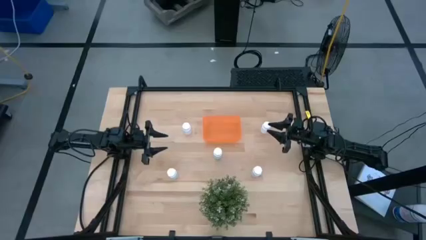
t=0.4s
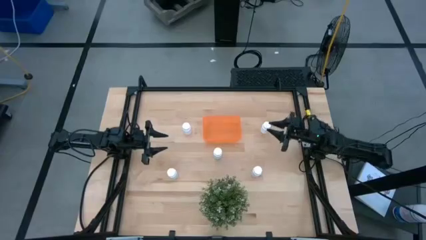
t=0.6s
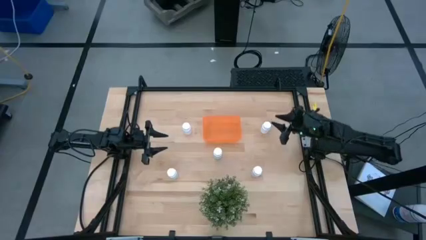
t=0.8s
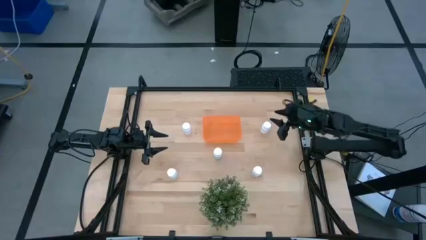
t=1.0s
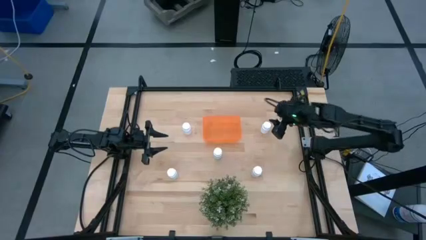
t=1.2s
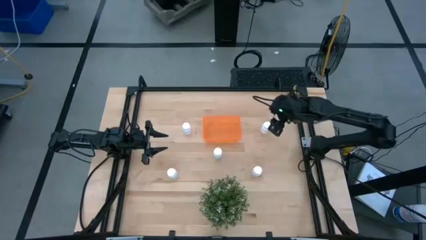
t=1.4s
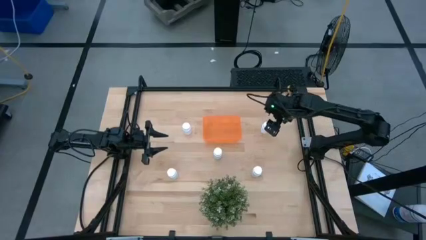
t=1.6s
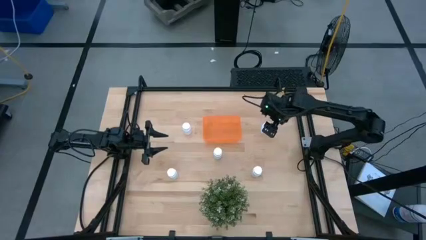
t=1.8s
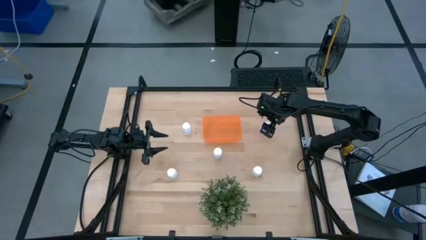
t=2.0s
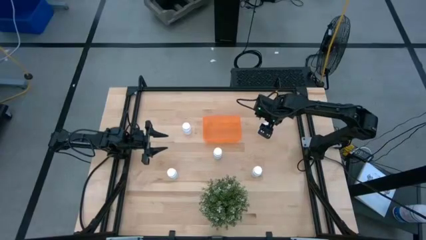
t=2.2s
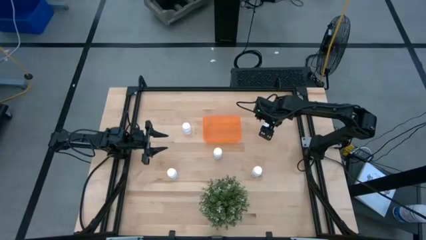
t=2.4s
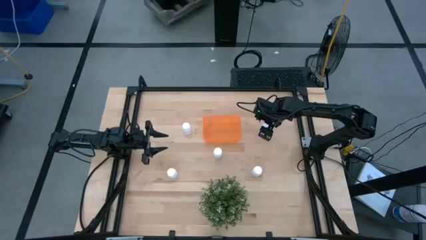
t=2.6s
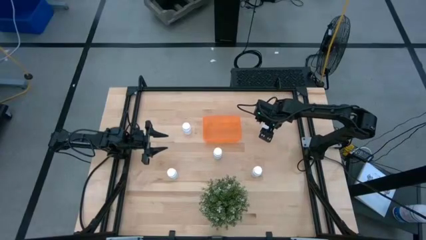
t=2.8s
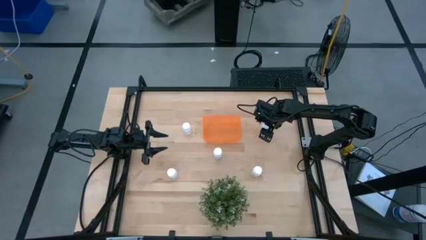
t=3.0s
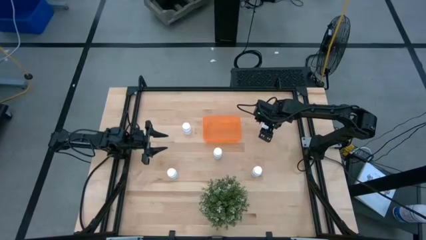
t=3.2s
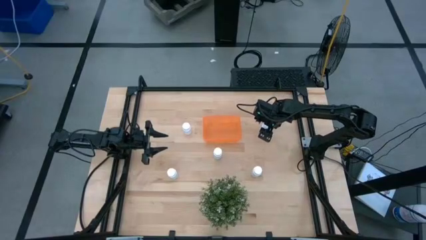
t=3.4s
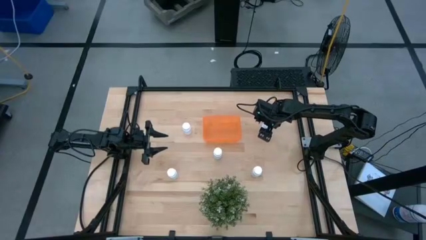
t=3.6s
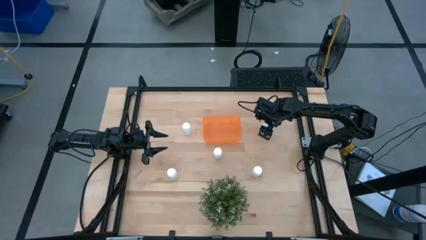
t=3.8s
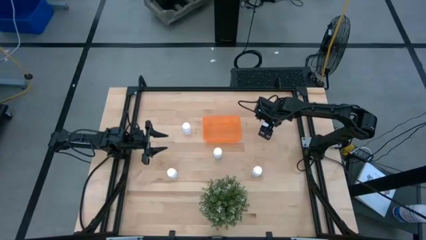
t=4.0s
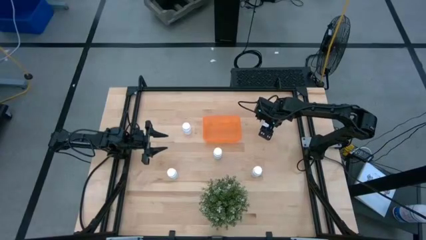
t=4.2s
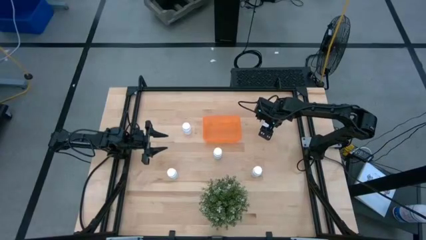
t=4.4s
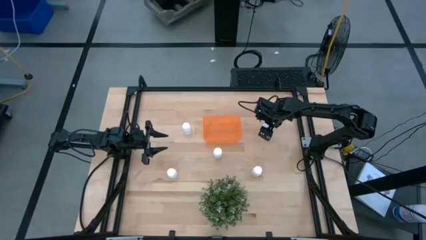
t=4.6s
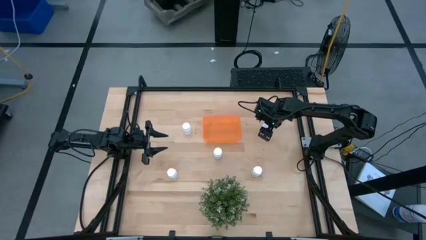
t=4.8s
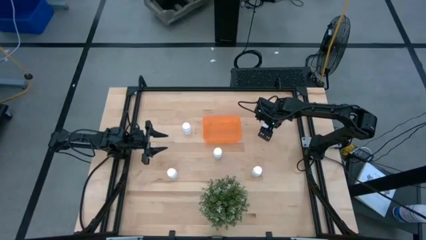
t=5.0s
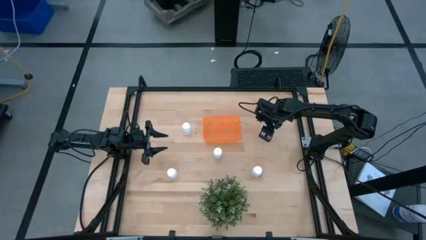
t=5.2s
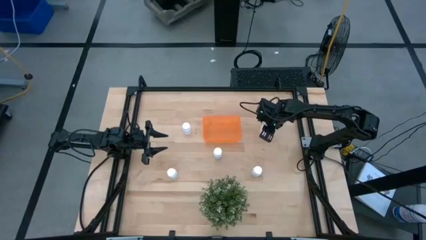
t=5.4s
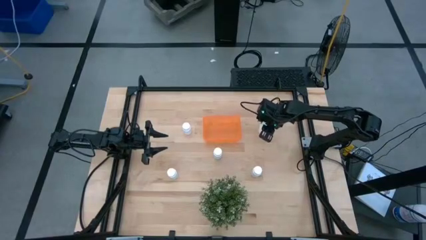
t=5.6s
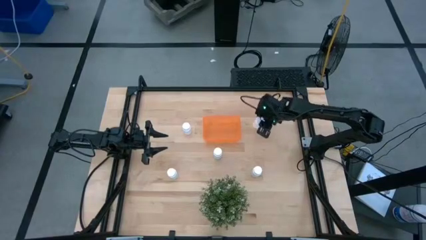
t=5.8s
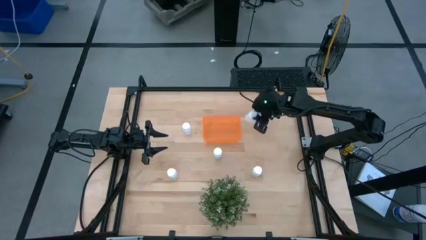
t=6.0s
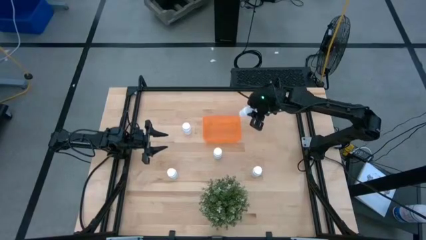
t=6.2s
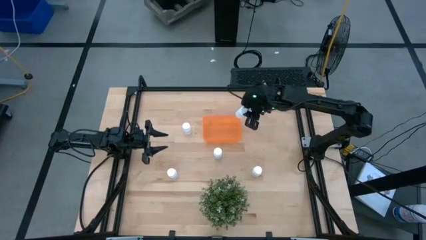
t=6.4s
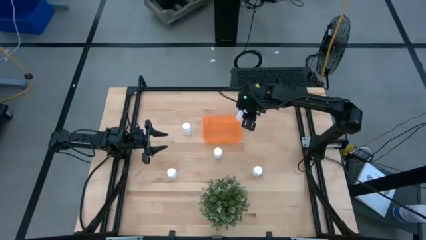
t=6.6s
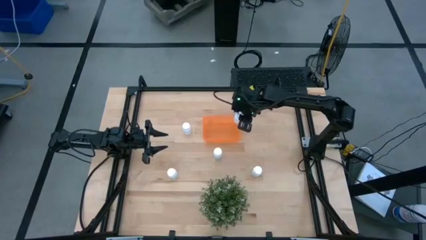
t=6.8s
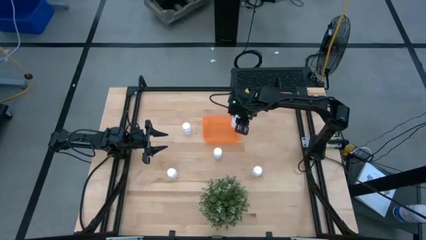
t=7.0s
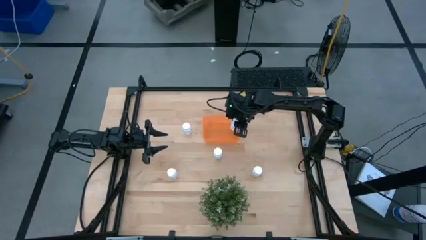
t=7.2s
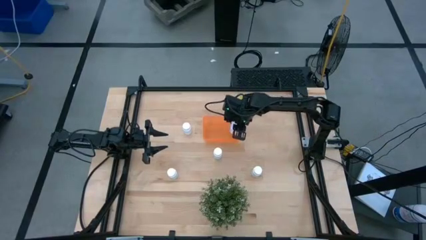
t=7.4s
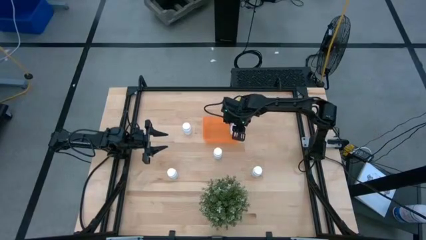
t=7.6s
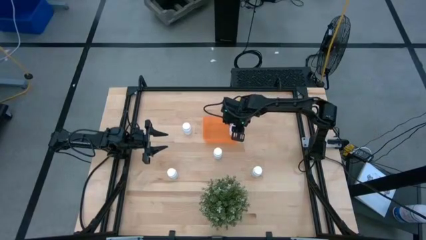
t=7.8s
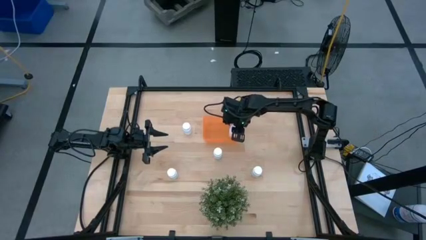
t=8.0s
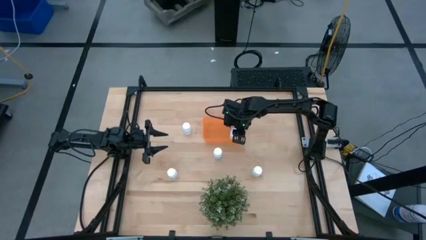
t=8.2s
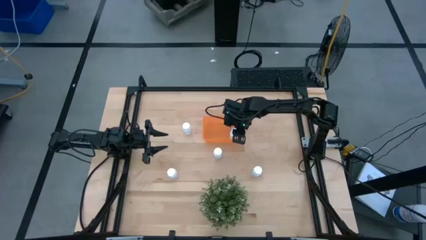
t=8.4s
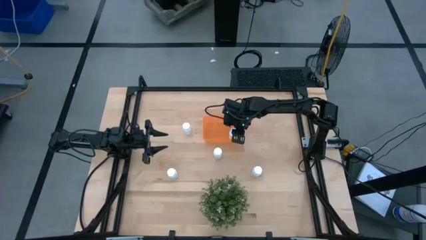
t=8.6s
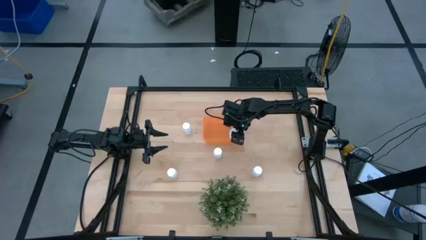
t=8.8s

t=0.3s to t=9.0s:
Task: Pick and place pill bottles into a basket
Put the white pill bottle into the orange bin

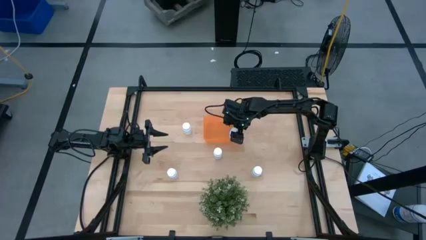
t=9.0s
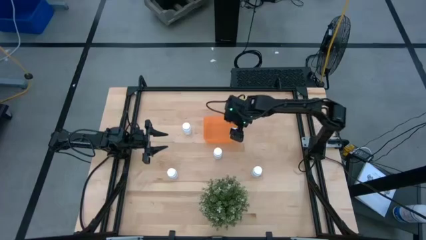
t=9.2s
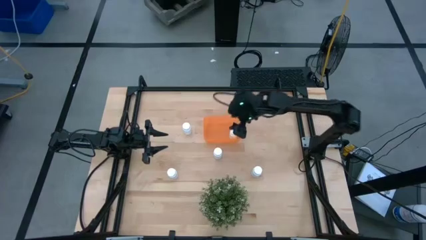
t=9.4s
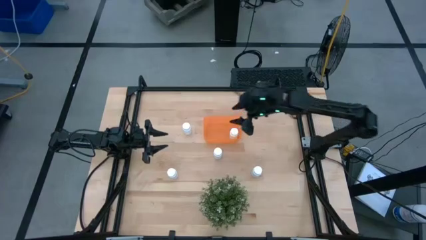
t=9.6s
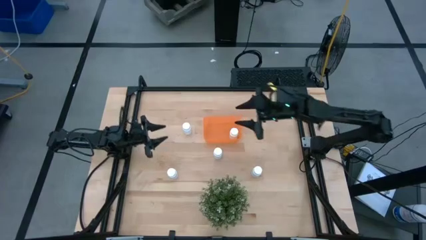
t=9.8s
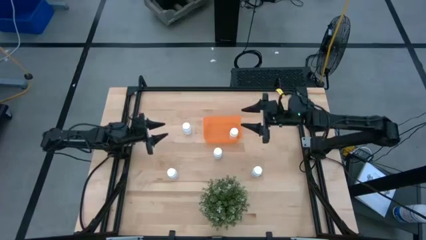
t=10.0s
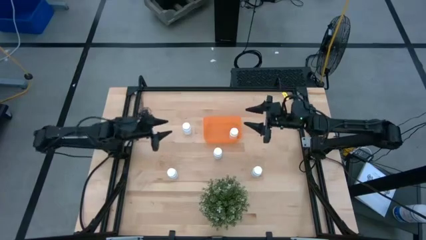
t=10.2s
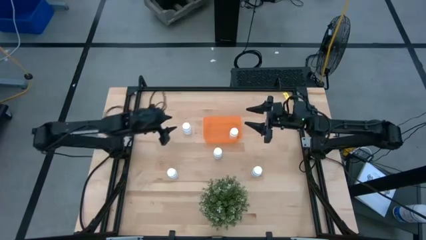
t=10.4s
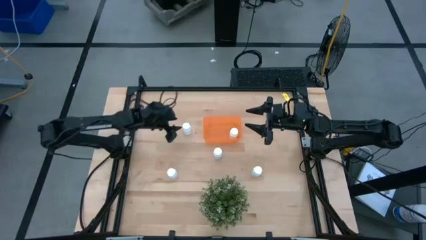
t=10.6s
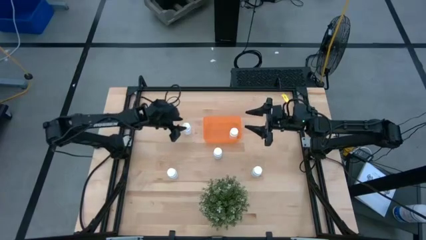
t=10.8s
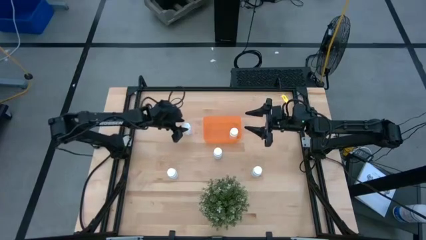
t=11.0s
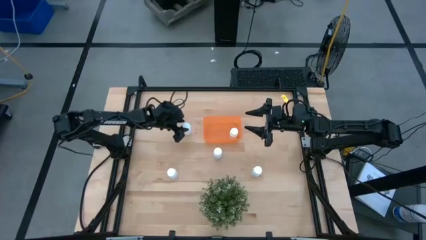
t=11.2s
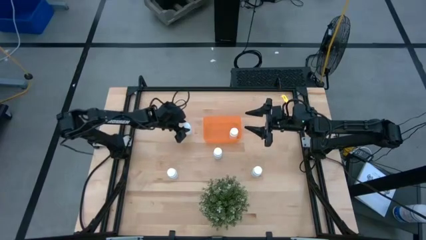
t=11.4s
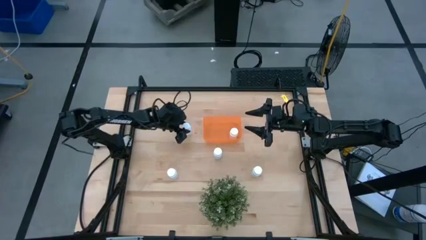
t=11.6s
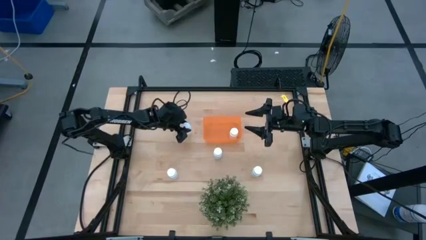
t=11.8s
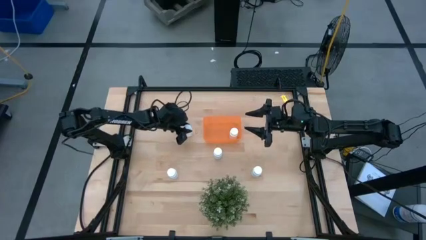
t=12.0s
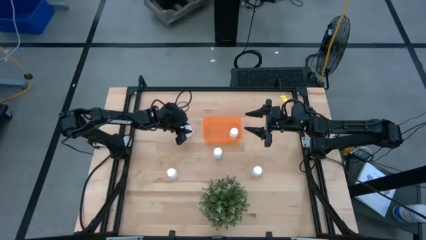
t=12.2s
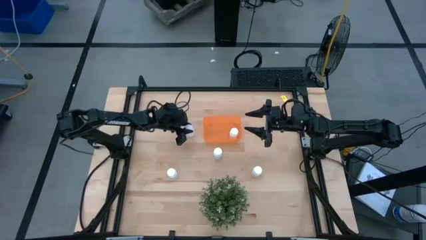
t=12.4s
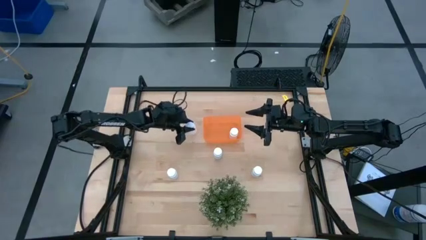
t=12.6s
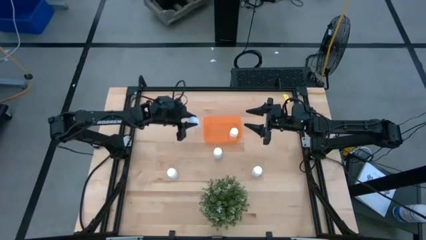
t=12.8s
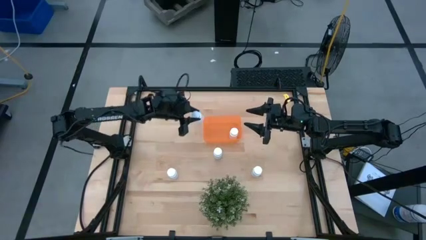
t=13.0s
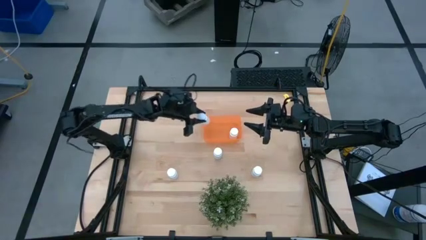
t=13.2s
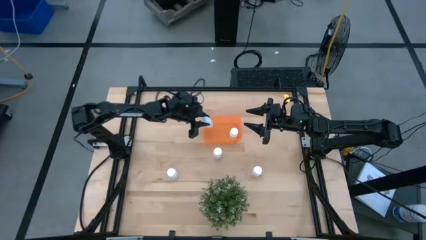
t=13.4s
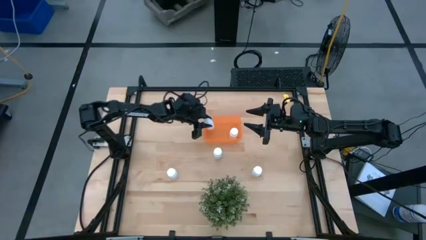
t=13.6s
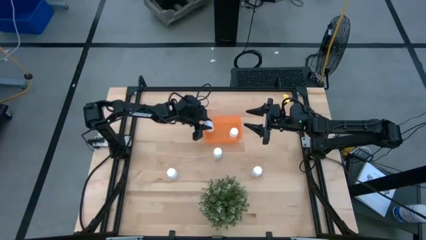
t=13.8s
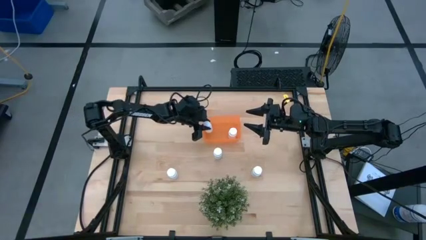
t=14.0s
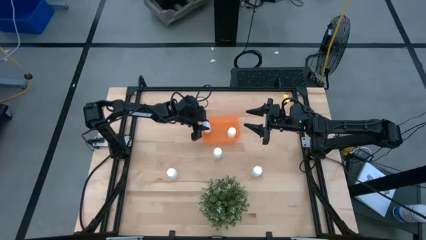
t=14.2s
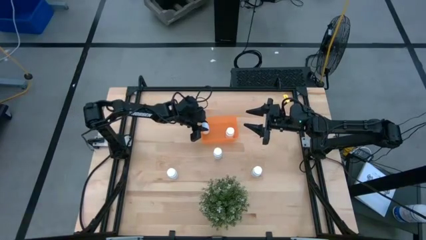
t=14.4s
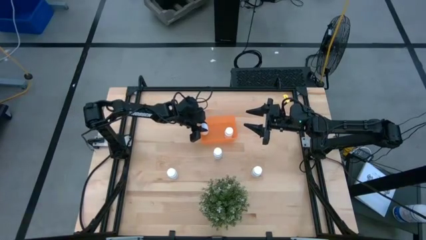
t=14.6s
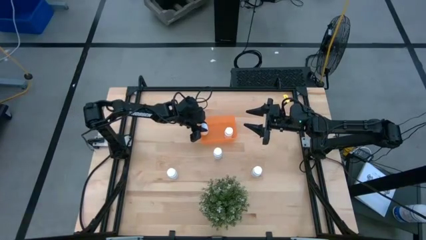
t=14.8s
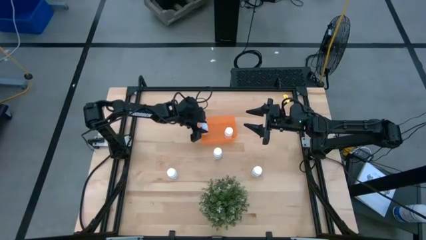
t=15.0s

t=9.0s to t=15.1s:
Put the white pill bottle into the orange bin

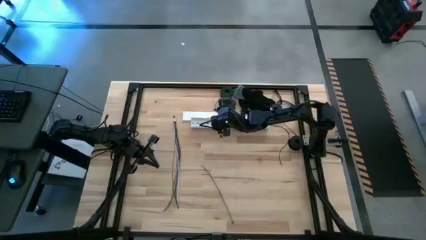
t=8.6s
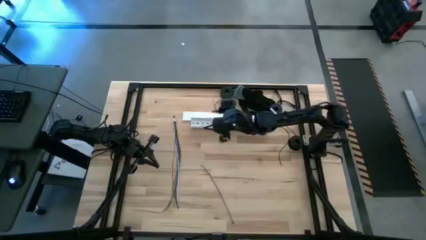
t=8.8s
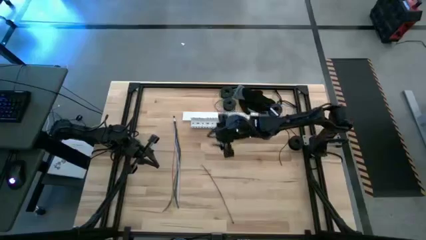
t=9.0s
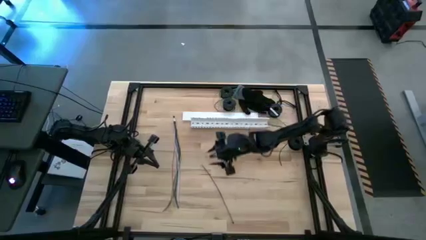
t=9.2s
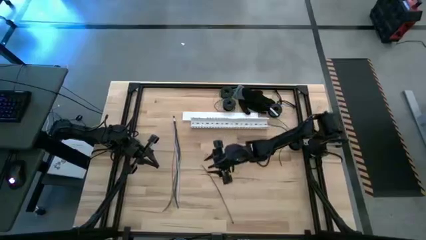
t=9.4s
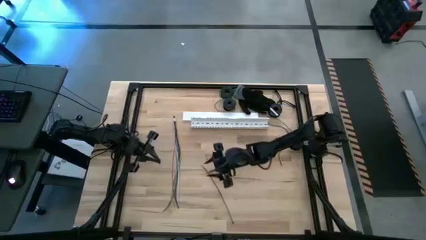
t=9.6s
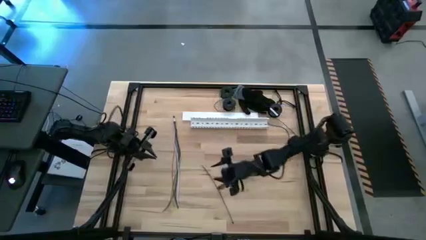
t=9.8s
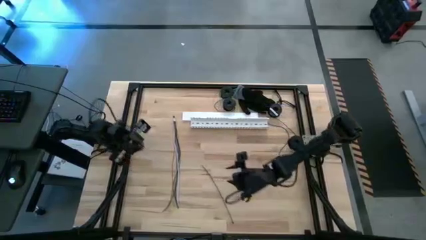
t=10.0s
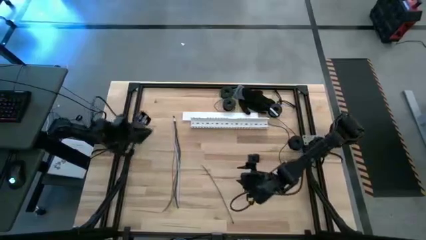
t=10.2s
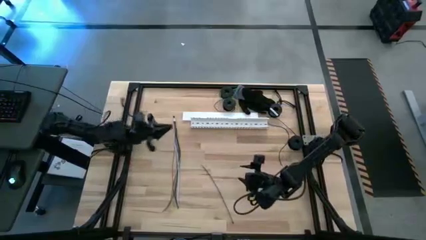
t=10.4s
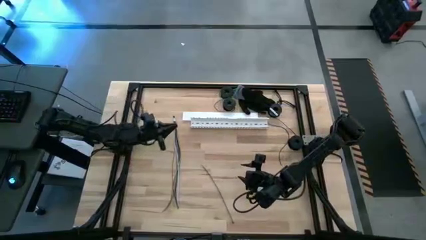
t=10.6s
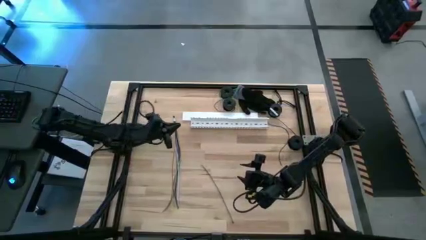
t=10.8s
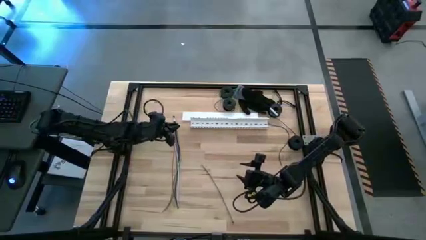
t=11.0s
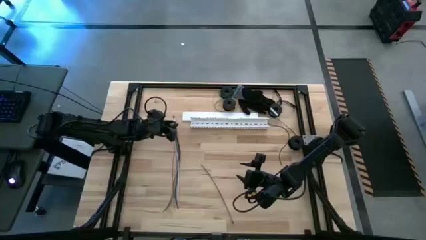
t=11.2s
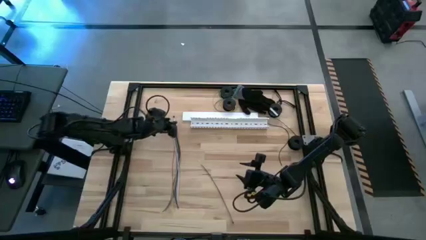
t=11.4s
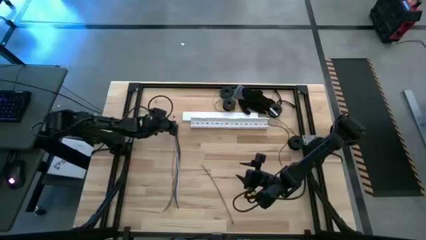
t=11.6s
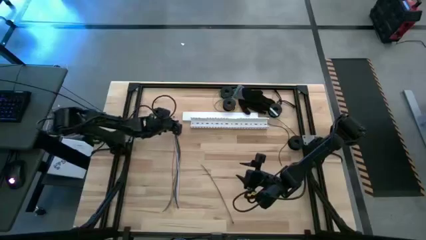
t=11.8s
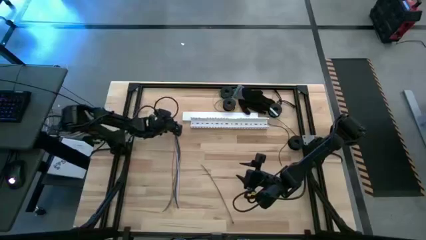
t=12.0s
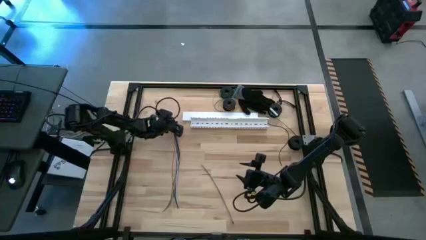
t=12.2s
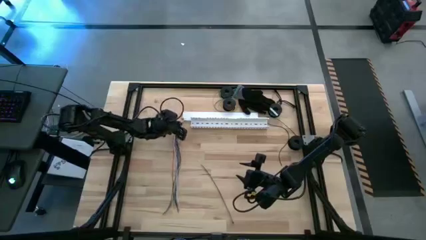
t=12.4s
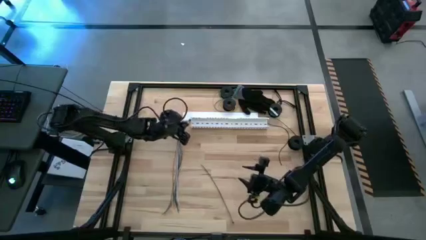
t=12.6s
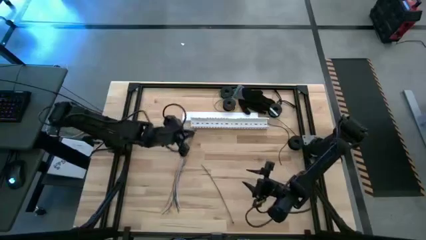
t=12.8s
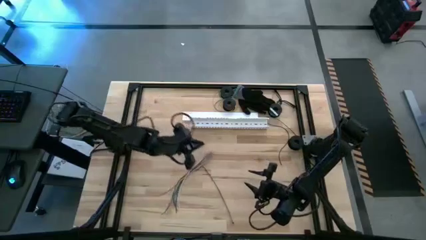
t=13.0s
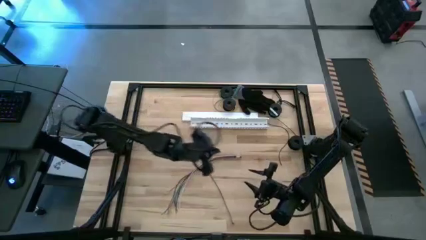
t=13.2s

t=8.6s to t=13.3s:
Task: Ziptie cables
Move the cables to the center of the table
